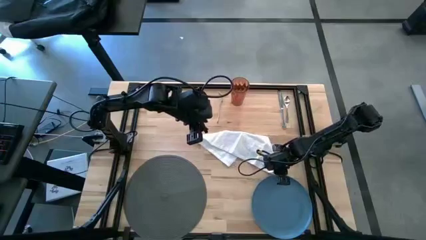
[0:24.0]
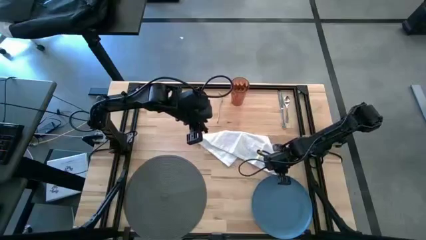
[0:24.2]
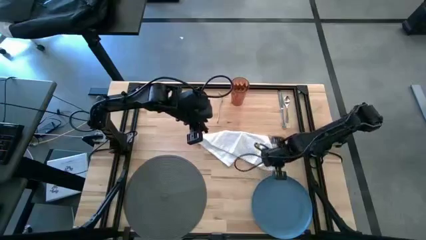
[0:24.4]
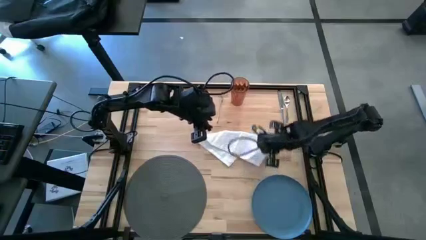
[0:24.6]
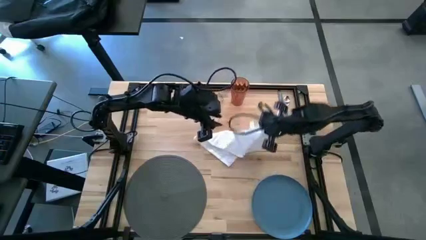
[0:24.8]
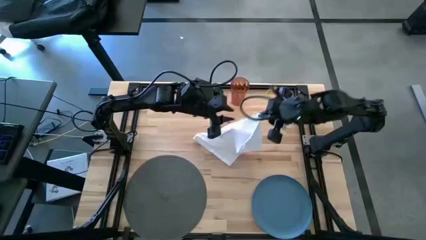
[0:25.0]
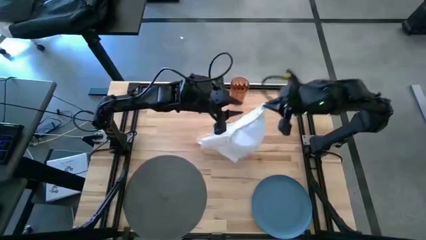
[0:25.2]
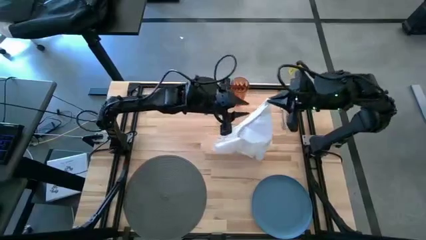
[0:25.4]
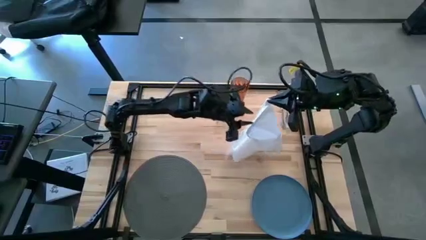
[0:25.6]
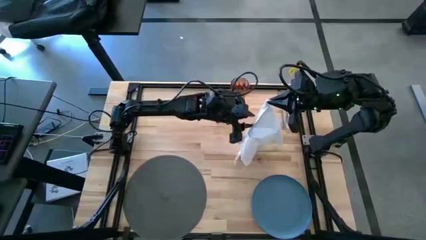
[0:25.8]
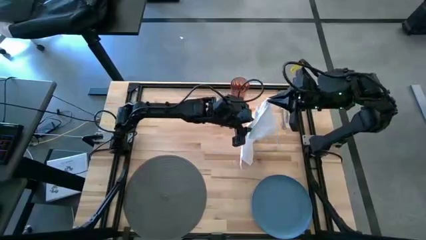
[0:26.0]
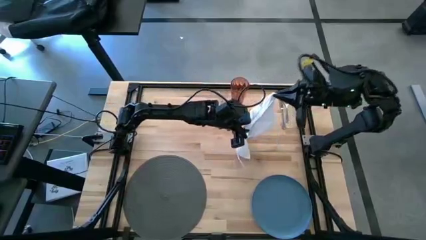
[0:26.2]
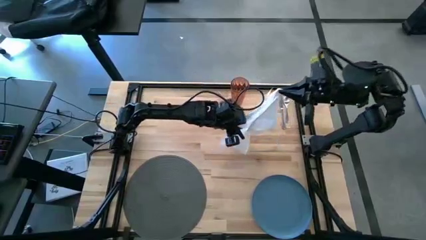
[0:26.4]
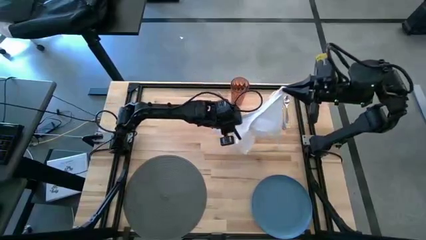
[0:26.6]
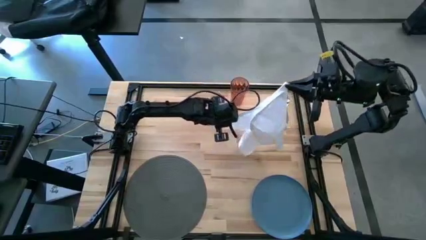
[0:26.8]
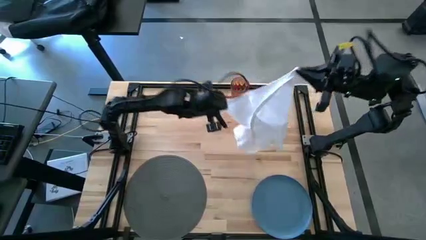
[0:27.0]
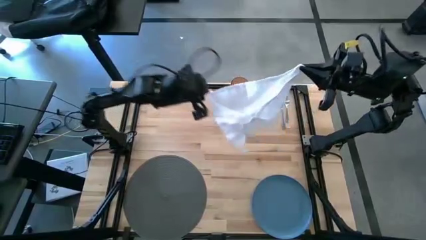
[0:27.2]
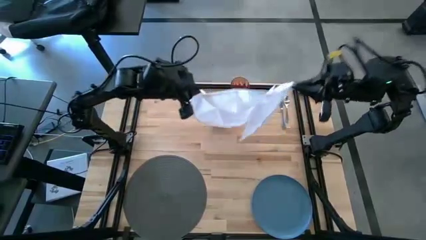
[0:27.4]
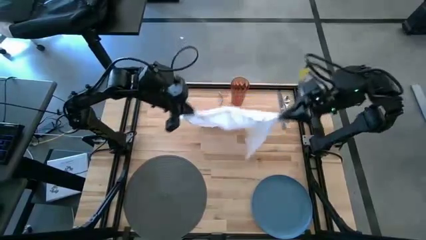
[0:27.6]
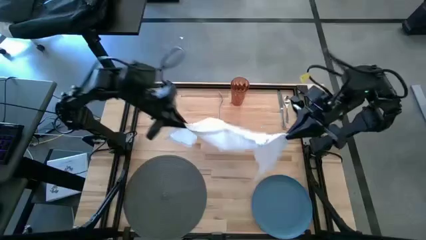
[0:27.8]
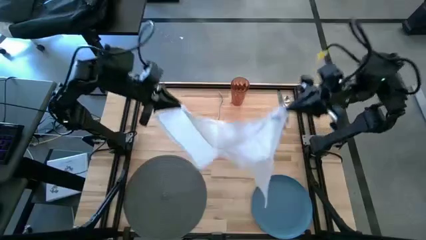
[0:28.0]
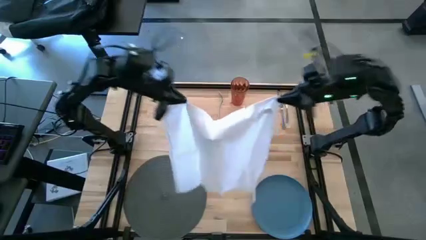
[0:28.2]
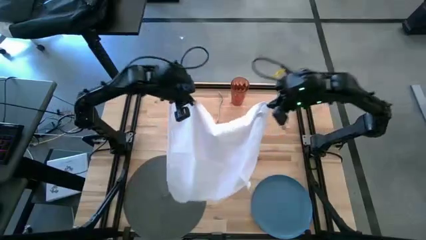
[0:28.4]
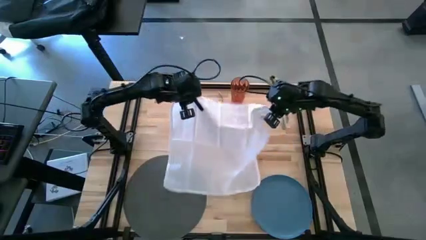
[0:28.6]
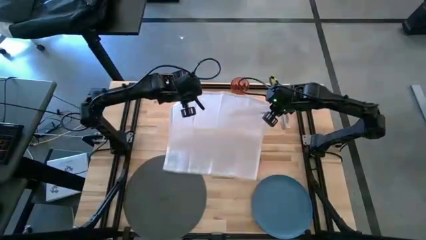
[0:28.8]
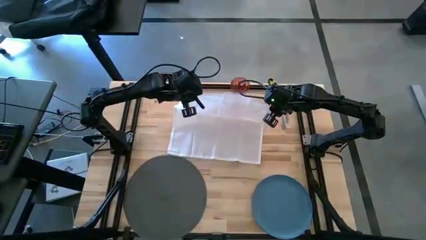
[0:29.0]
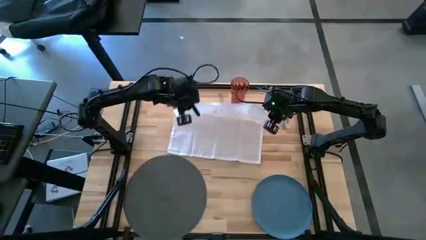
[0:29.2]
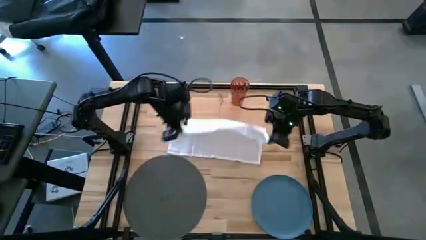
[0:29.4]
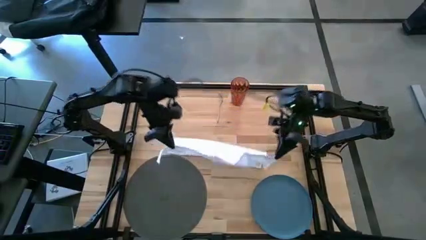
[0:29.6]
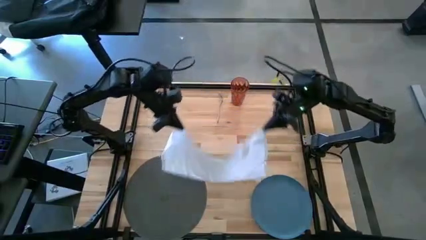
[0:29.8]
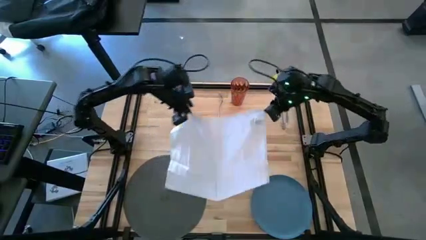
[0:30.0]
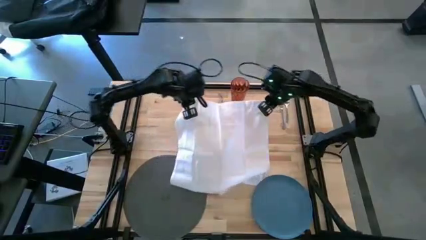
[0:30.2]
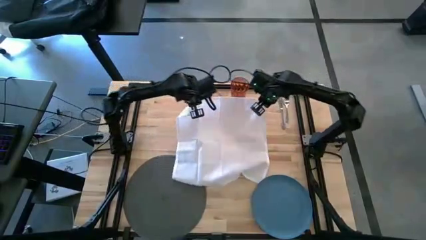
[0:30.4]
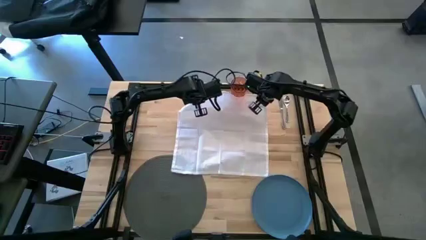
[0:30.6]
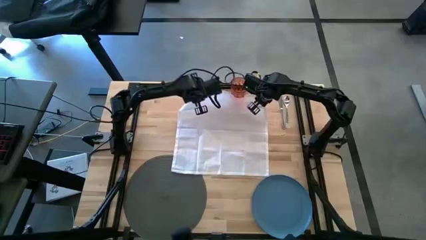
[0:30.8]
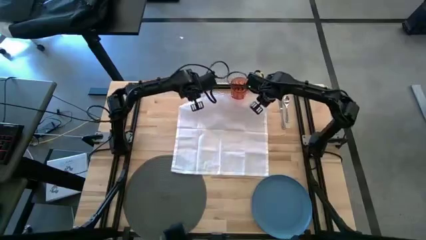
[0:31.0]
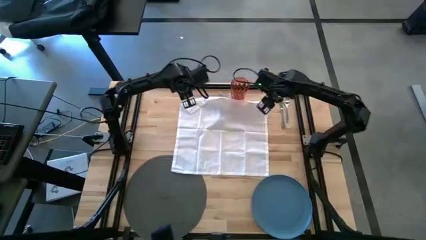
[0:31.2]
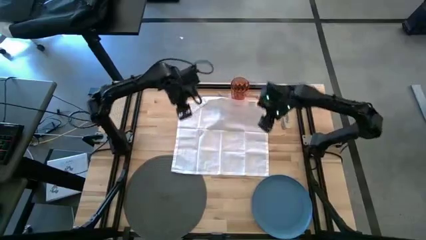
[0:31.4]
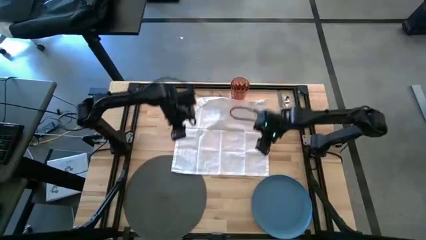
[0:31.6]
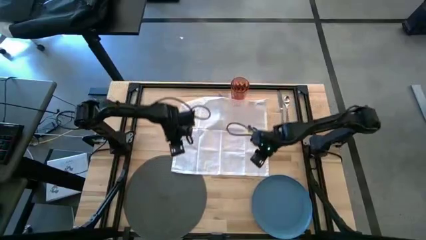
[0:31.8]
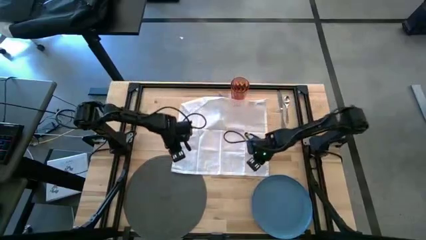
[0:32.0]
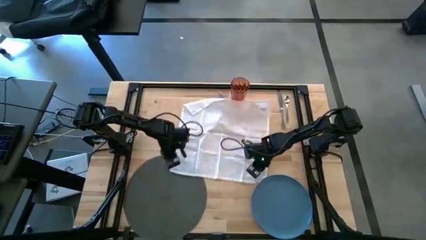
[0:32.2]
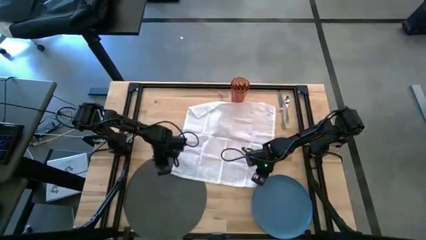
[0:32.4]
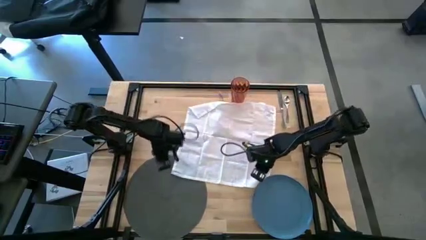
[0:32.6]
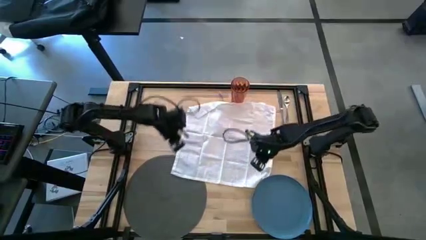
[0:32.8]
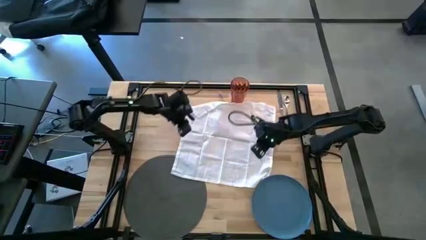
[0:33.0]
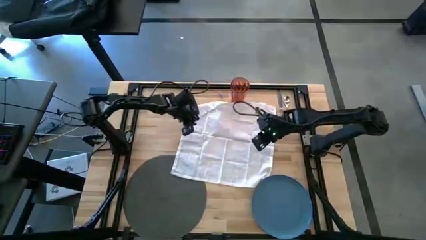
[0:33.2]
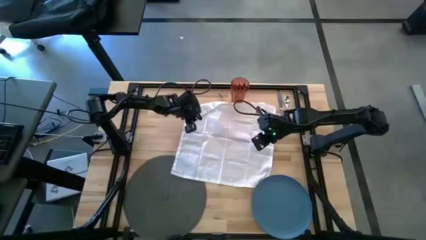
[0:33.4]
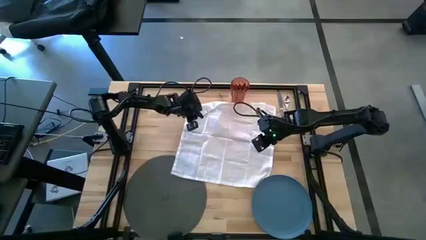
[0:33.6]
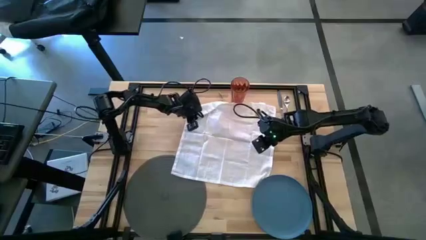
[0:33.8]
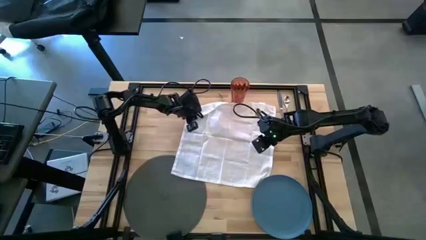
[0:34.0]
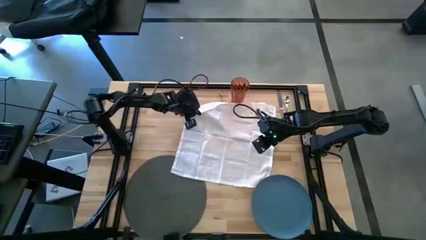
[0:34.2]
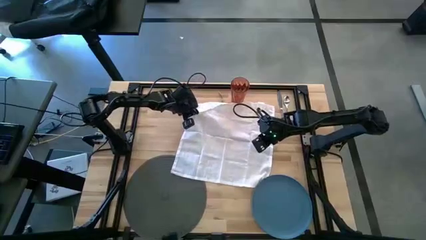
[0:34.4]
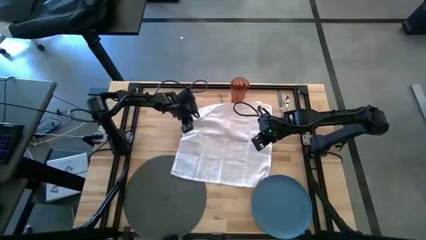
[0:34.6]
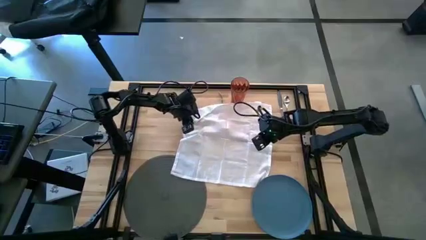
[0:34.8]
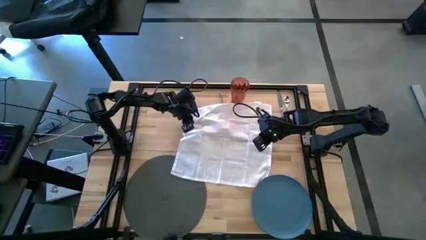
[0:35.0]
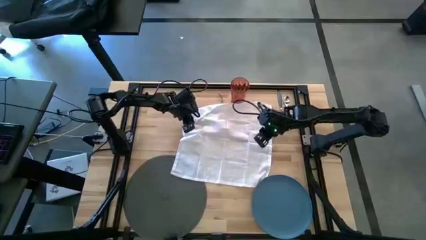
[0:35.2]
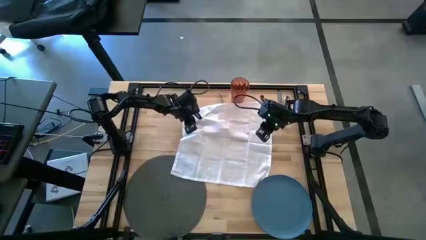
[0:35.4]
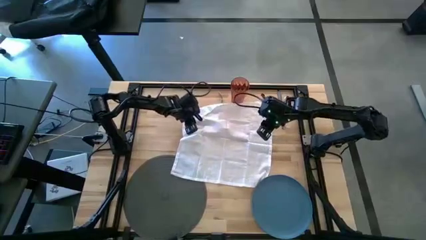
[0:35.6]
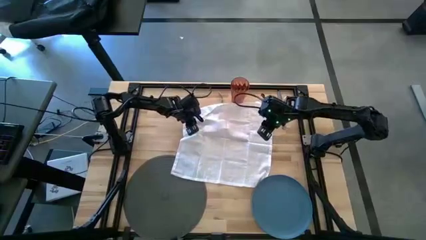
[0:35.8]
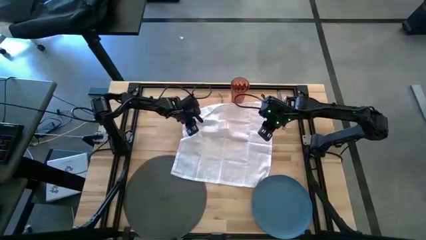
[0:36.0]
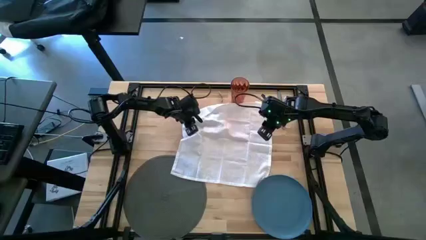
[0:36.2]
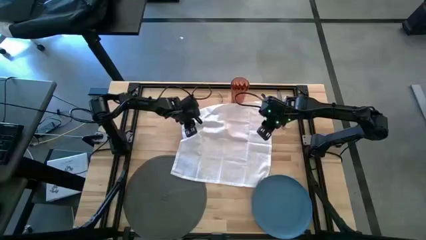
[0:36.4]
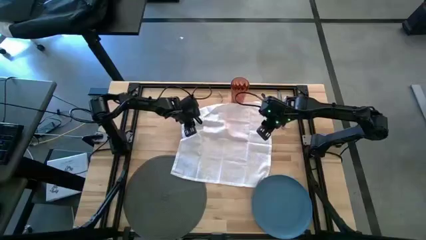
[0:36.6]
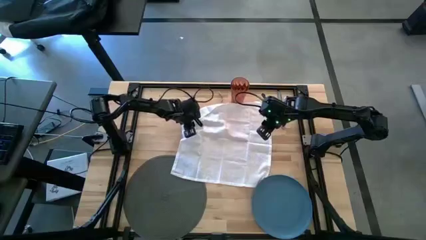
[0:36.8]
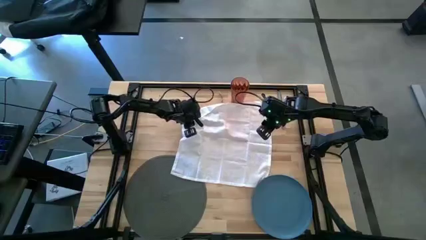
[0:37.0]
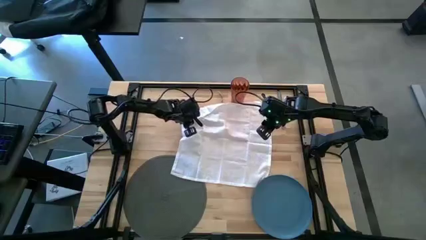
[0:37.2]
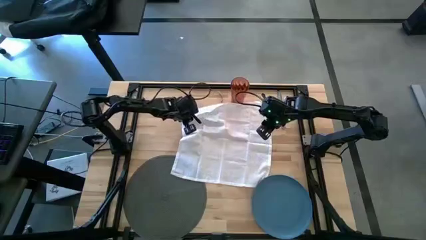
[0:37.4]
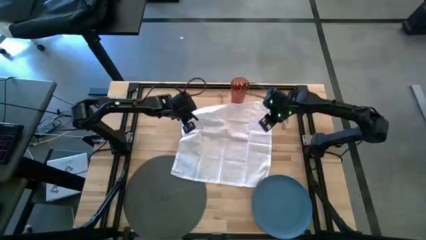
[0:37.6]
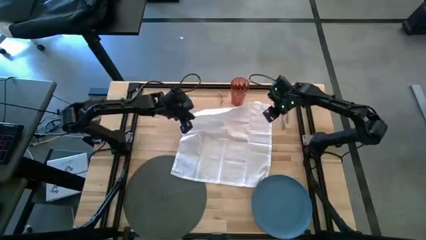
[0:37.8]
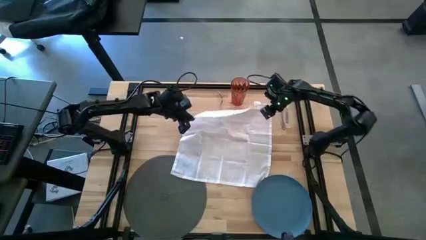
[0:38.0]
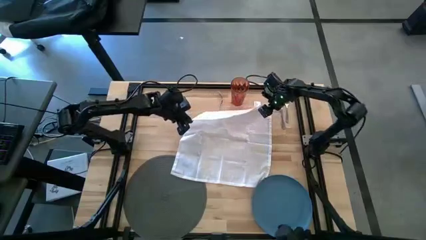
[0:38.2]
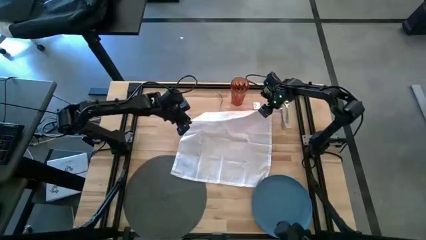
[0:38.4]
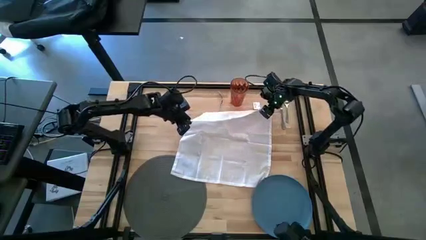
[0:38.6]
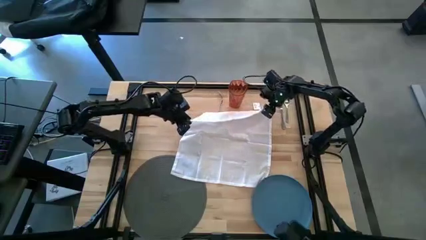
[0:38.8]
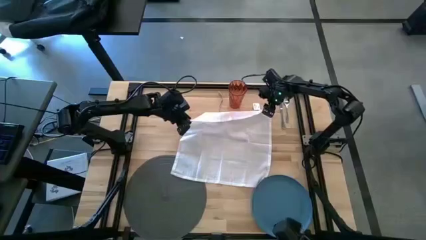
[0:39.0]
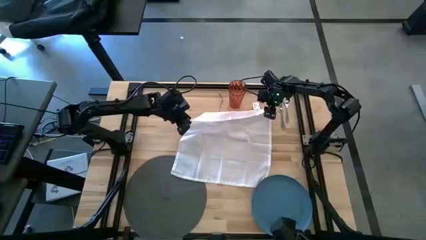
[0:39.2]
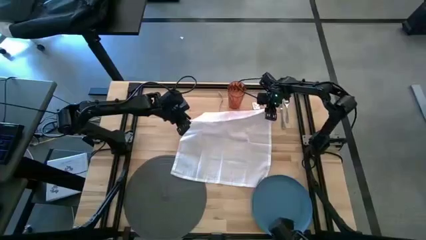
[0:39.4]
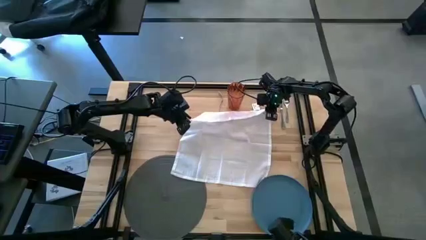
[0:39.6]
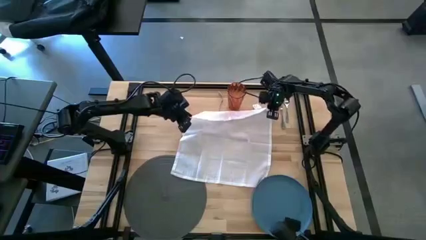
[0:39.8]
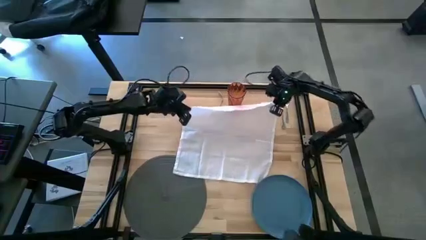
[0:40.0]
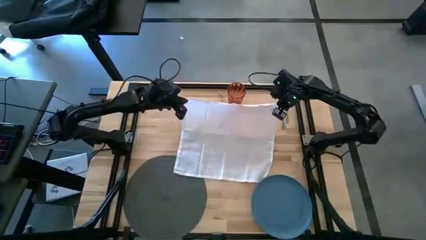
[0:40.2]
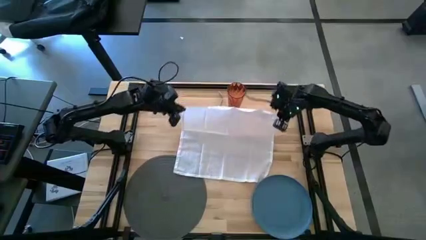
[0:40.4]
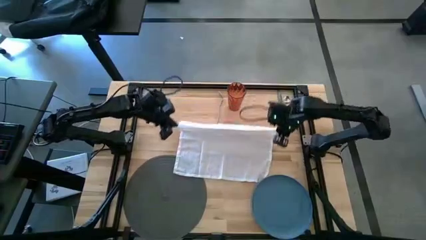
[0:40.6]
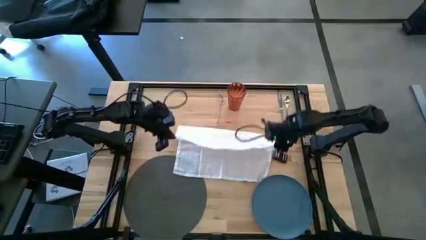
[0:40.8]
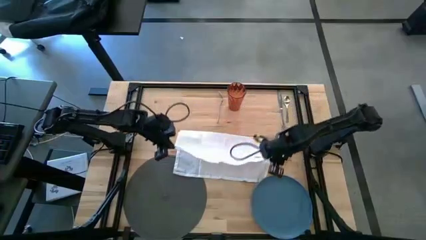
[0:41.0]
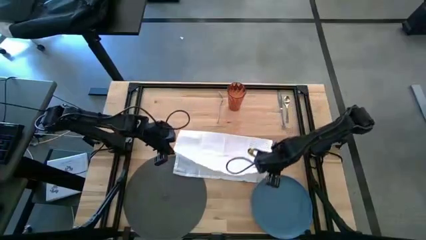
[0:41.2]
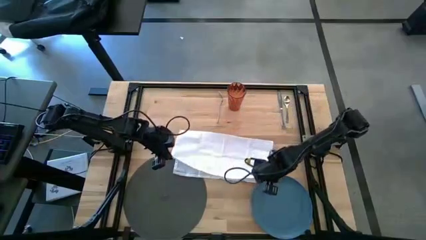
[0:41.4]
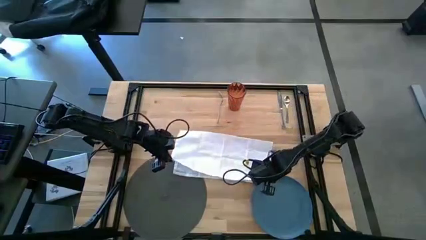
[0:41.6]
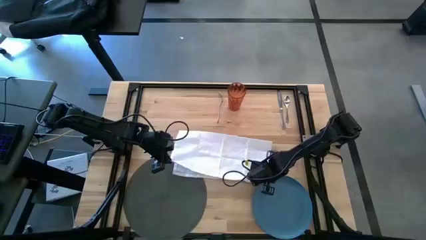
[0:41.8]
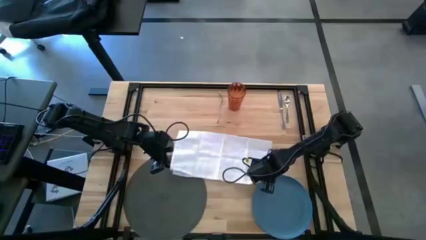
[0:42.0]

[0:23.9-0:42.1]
Task: Set table place
Fold the white napkin
